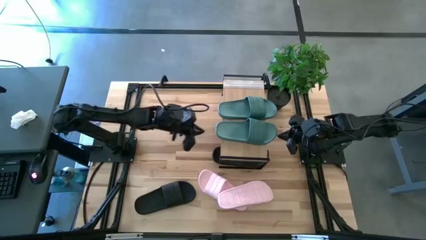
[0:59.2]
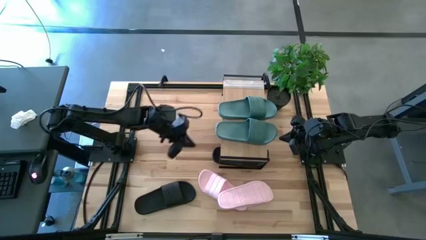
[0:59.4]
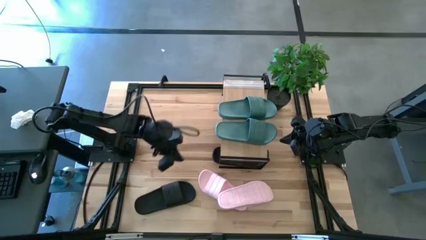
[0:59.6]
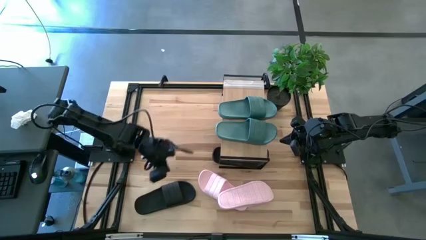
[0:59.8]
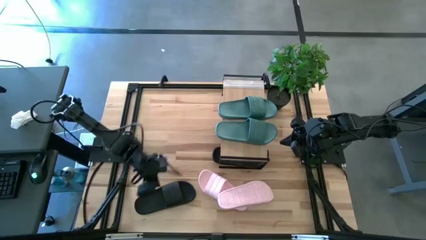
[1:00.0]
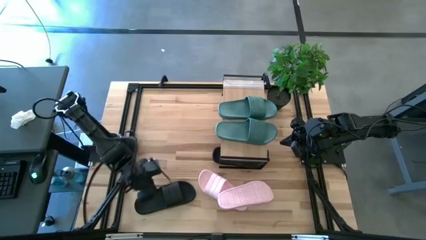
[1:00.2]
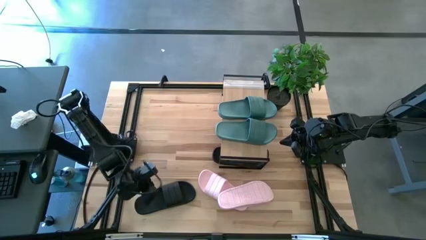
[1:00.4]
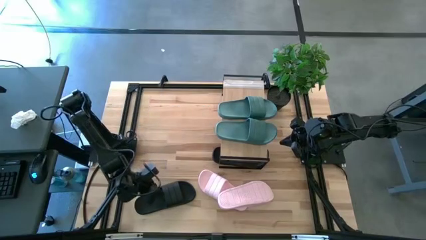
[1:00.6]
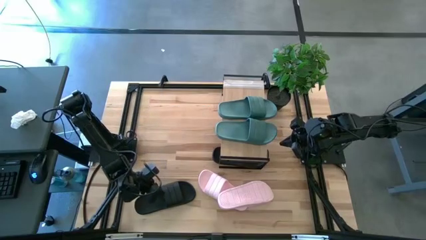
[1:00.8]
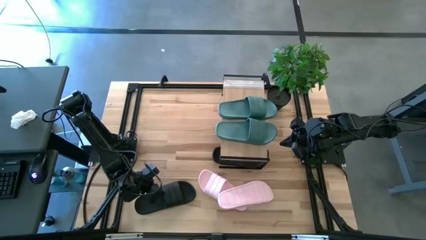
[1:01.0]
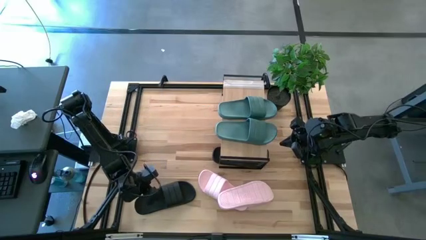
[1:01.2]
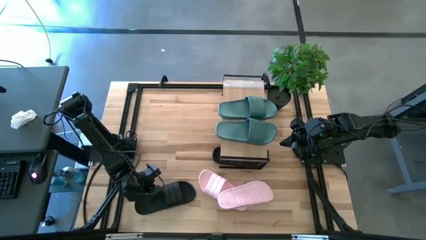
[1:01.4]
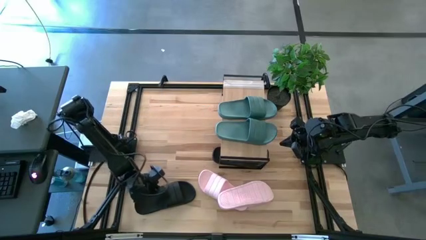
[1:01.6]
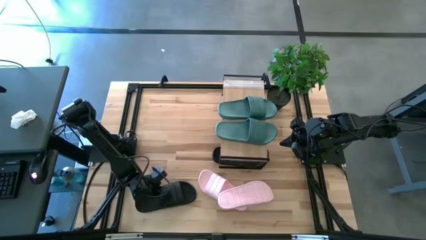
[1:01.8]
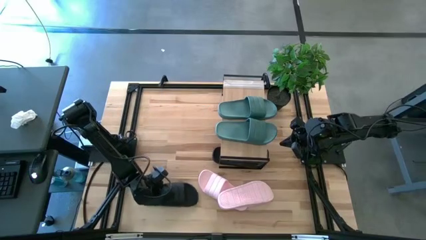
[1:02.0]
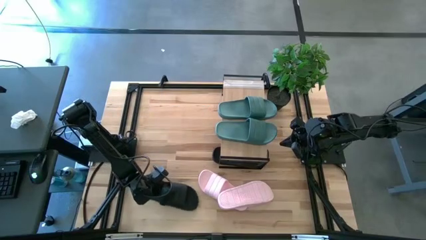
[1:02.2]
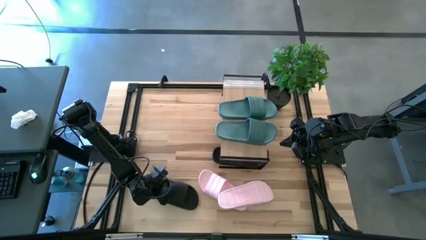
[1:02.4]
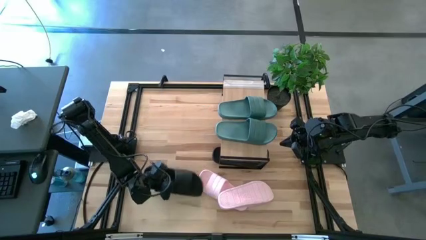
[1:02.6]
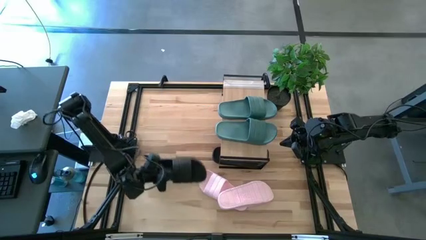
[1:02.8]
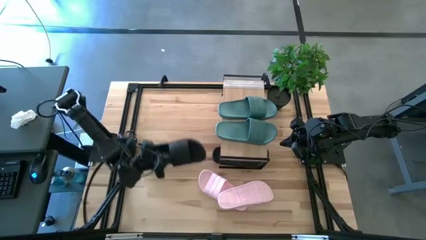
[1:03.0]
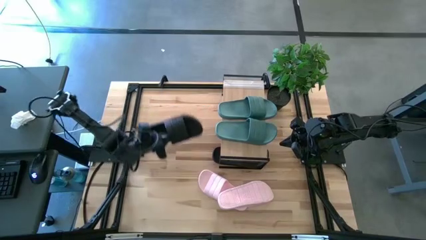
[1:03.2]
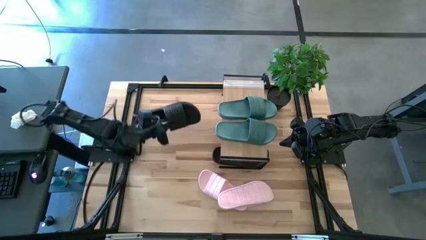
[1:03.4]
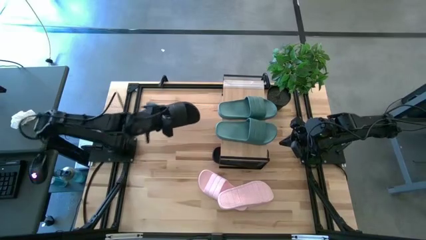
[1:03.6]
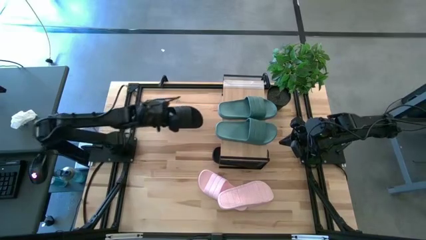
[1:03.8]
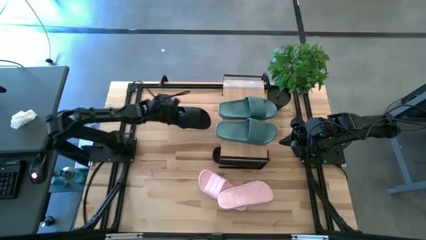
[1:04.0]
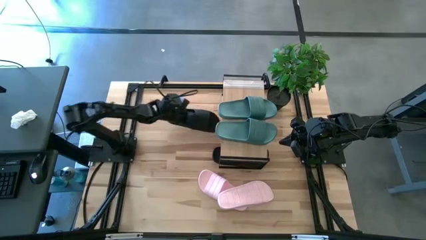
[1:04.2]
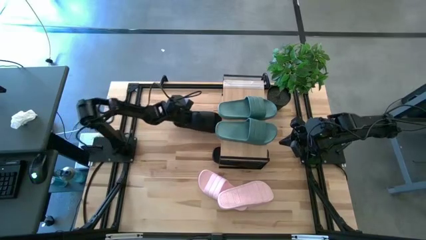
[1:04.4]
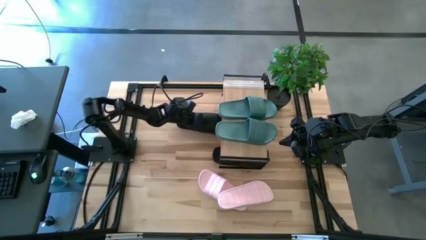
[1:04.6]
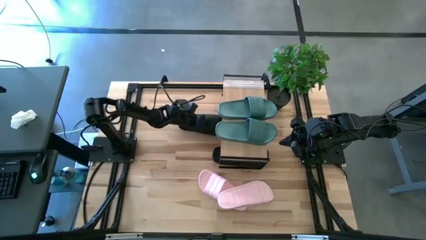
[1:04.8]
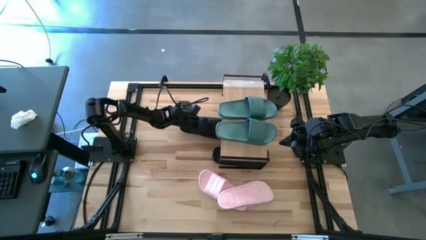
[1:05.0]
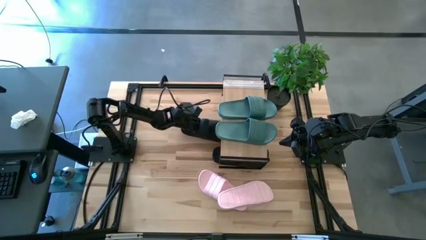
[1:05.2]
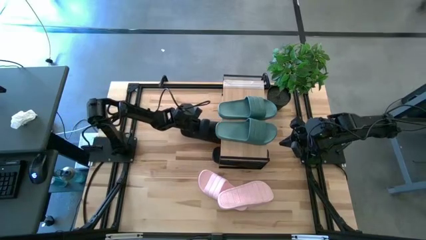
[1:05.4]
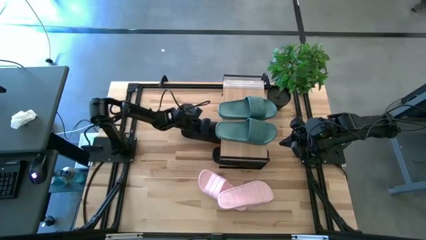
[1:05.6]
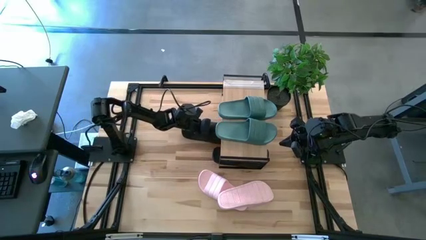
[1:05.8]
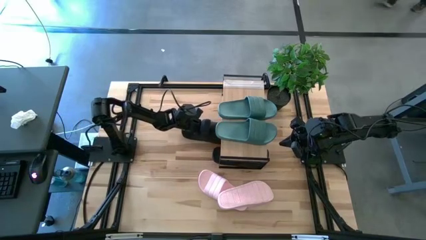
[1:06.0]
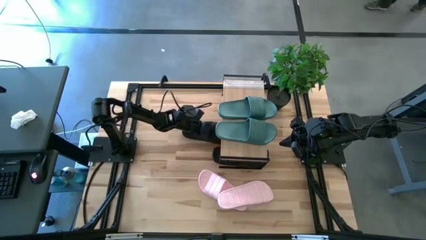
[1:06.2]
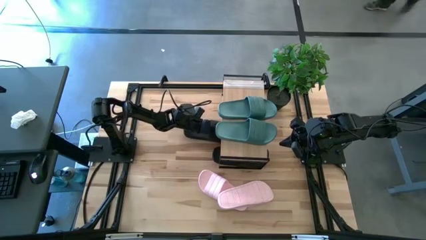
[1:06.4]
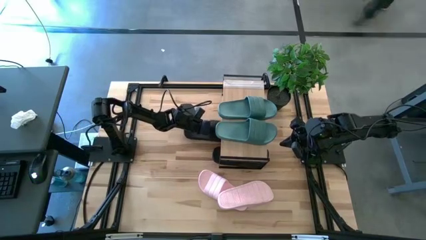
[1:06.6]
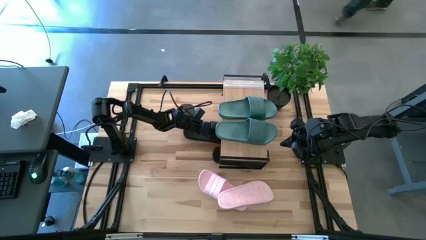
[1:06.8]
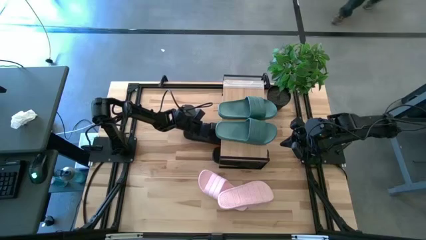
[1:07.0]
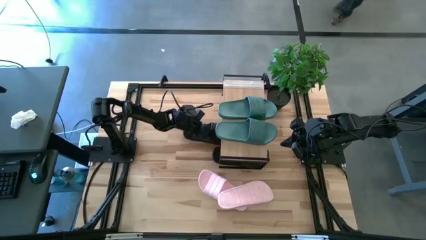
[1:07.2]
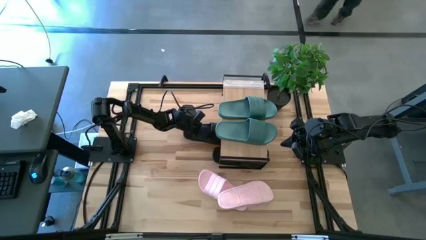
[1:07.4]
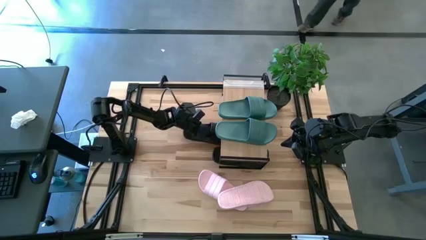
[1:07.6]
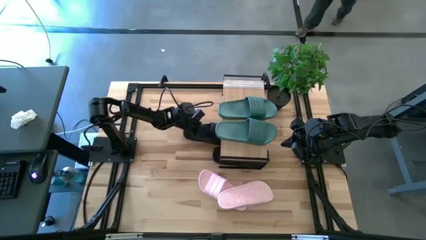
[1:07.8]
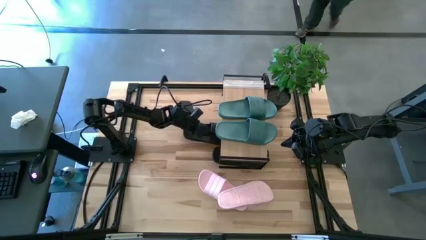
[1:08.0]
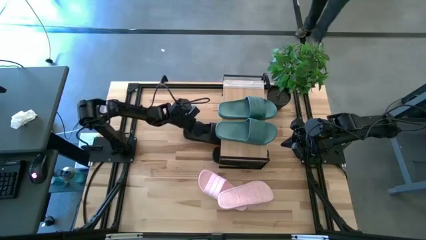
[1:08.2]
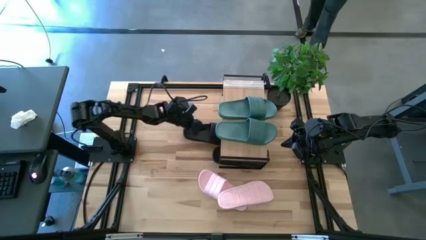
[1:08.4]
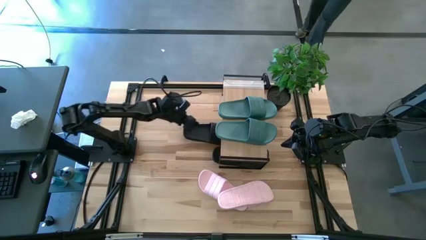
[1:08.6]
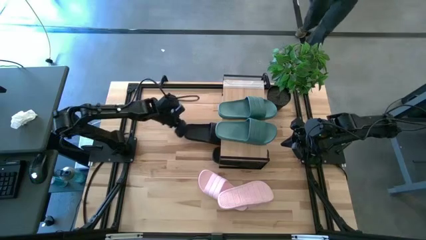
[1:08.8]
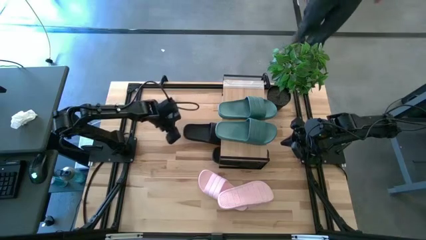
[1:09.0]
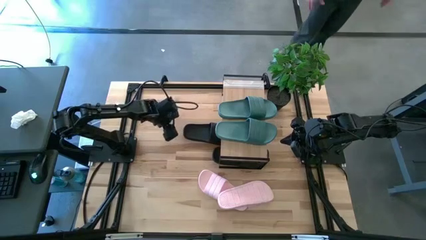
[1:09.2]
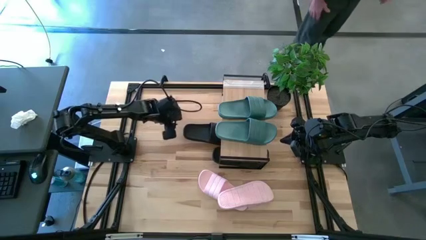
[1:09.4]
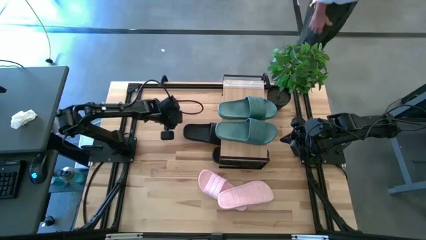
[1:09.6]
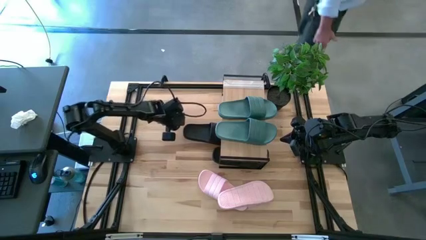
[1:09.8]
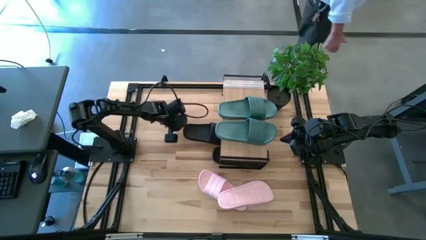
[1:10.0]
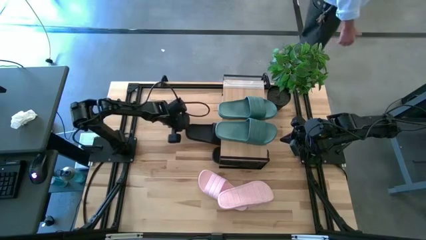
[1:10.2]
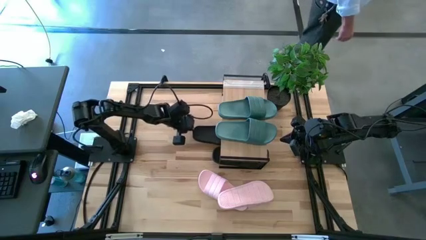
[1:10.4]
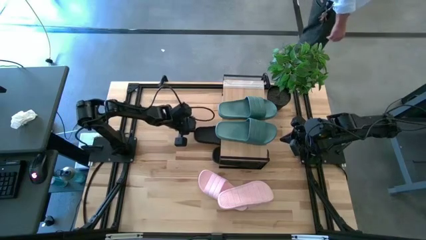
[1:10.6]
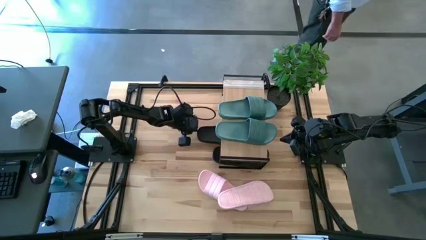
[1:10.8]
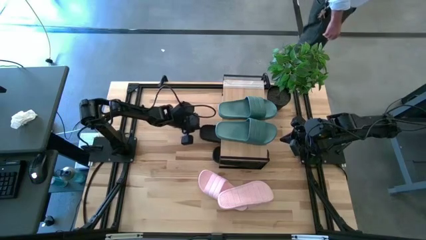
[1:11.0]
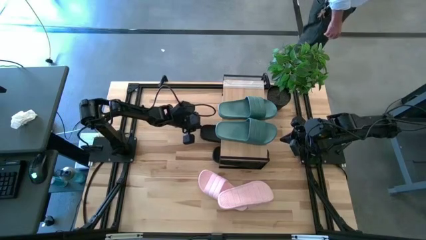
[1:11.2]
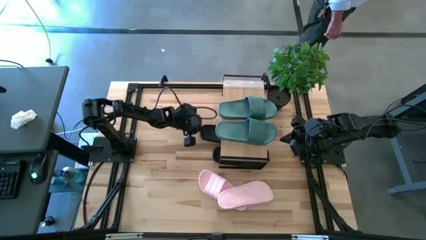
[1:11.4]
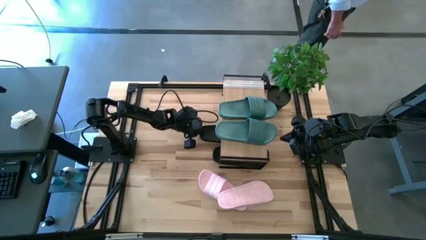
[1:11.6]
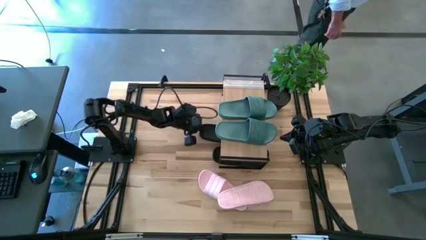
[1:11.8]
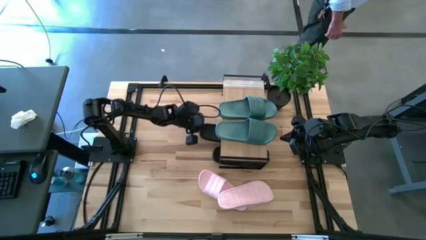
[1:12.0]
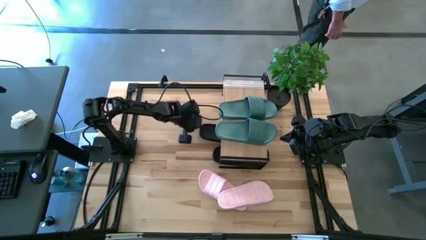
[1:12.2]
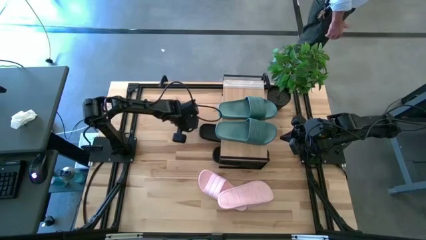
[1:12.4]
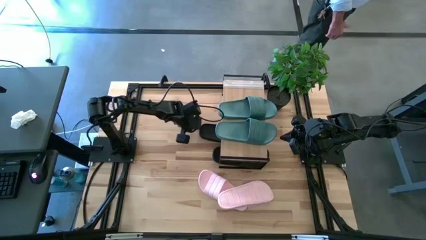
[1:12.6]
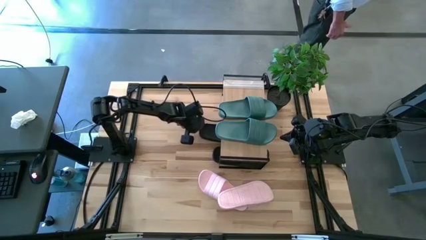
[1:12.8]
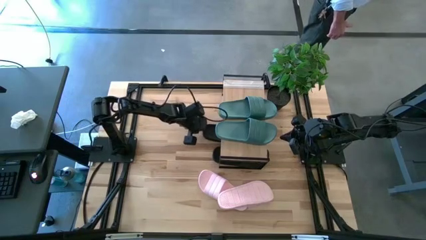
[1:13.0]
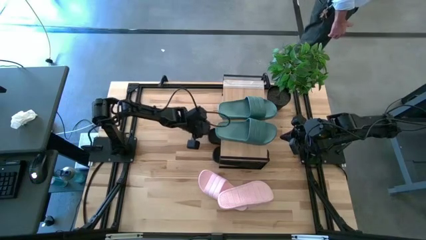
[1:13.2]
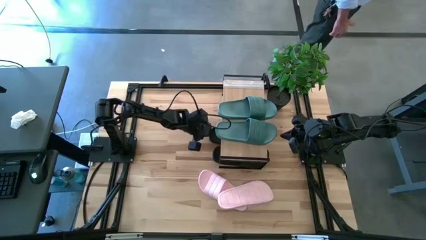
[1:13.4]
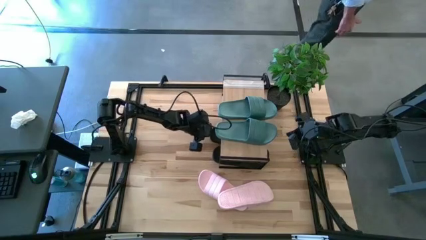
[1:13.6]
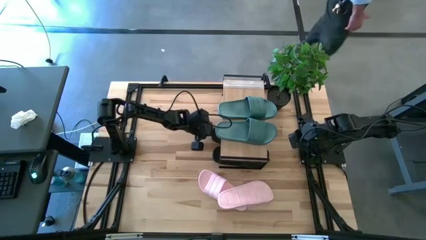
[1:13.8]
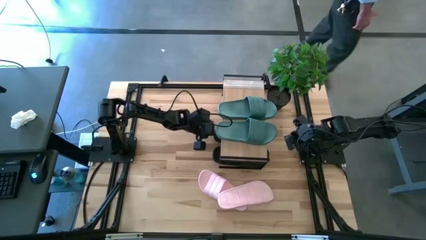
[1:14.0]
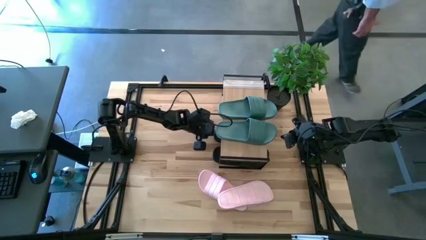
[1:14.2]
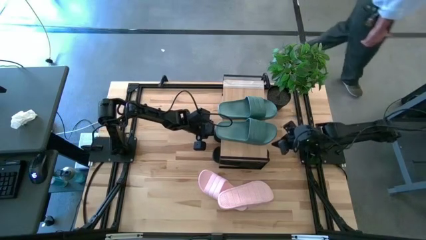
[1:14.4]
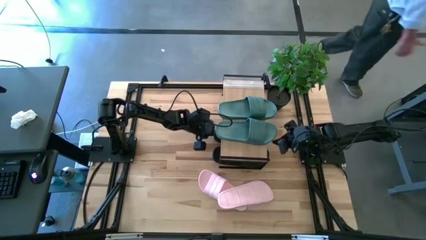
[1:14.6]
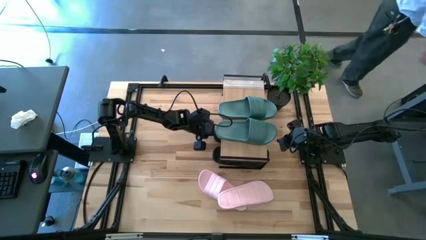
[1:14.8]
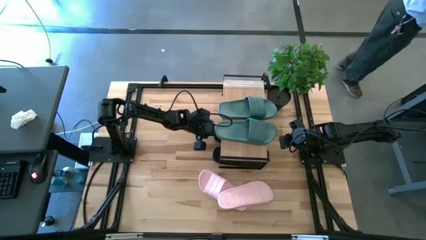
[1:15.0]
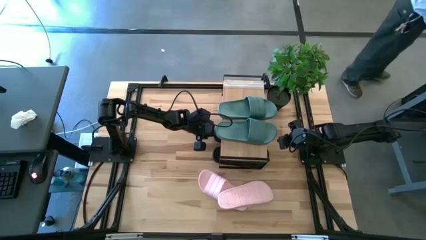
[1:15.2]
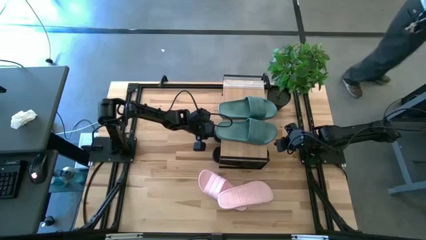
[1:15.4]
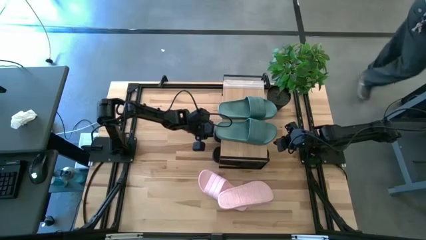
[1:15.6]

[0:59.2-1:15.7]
Task: Pick and place slides into the shelf
Put the black slipper under the shelf
